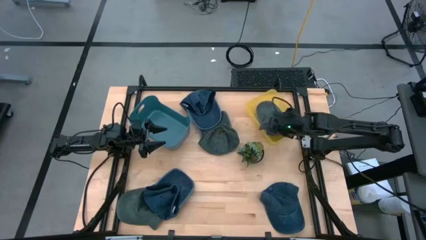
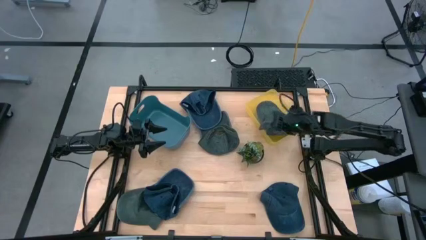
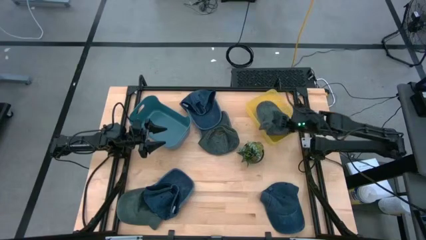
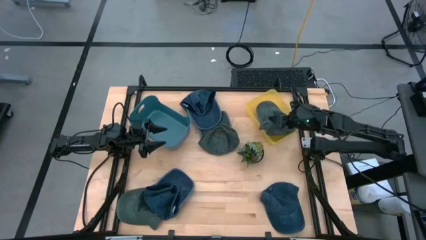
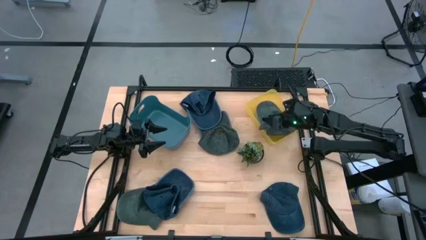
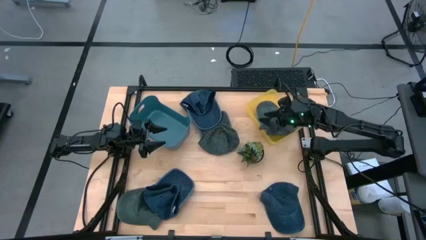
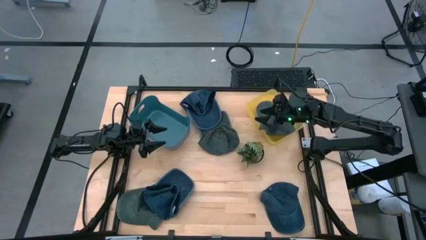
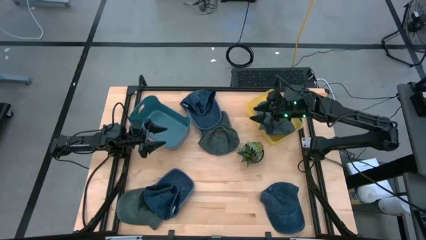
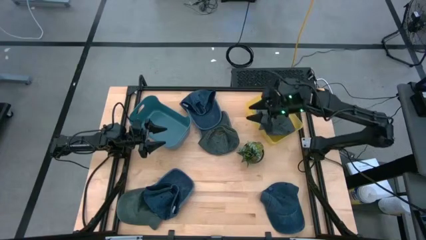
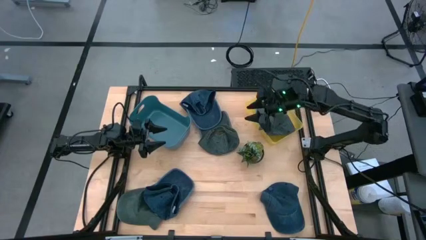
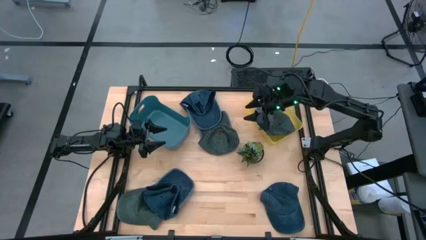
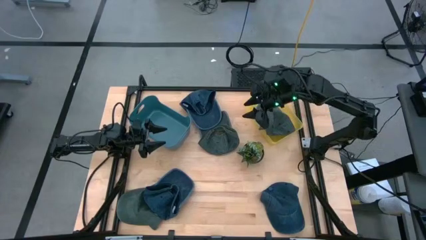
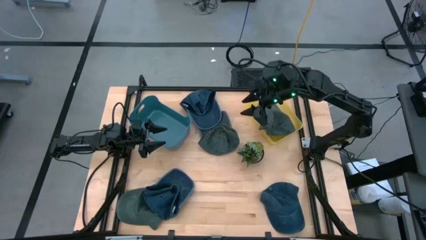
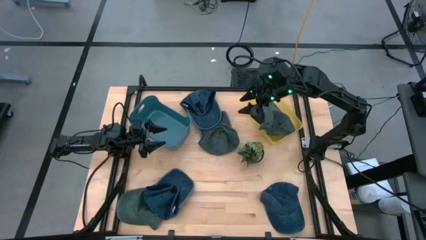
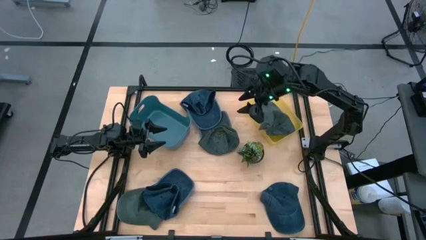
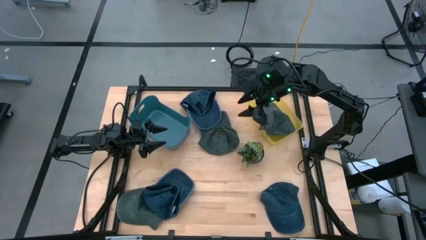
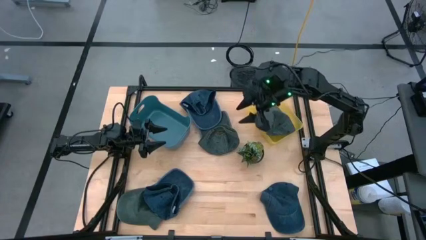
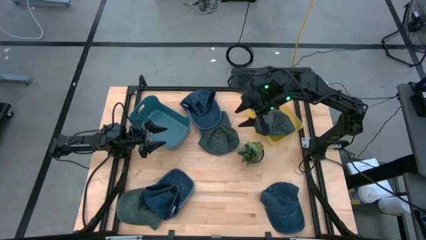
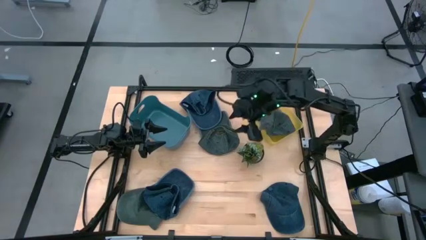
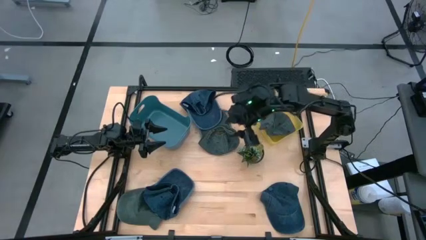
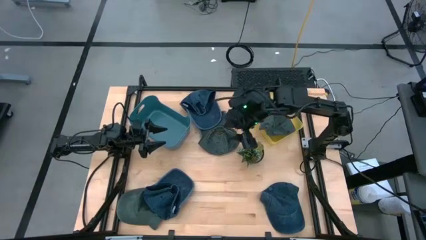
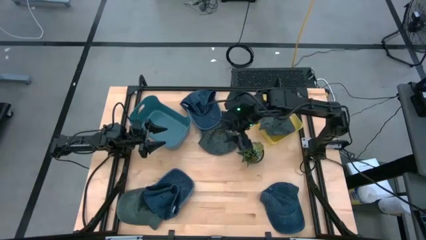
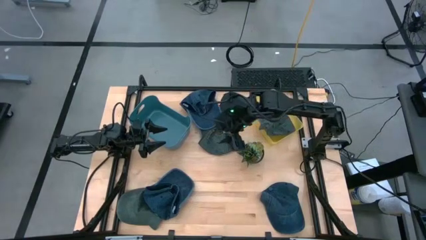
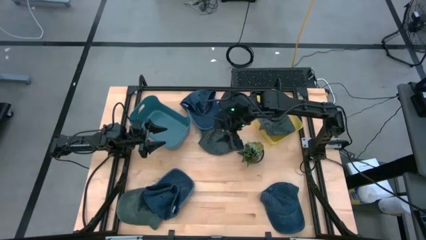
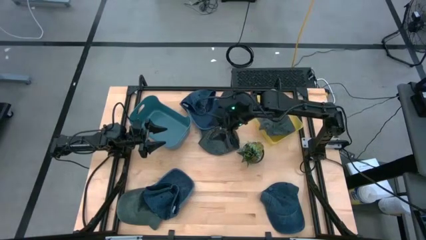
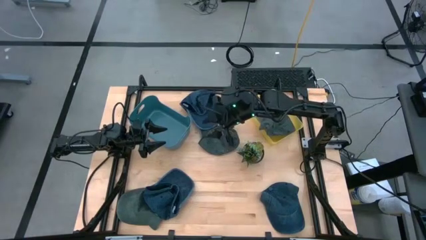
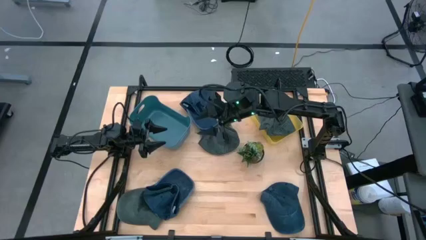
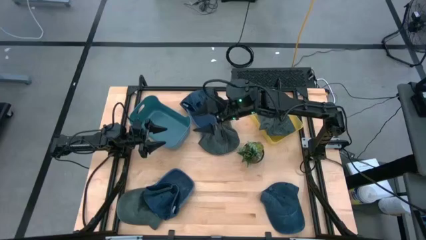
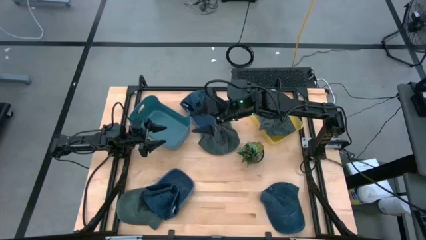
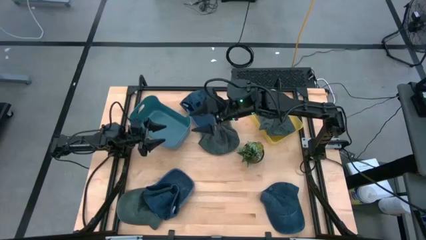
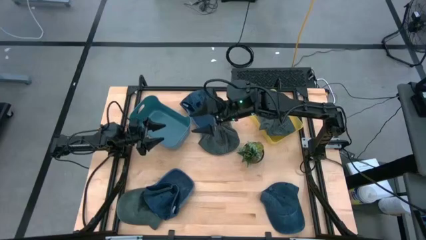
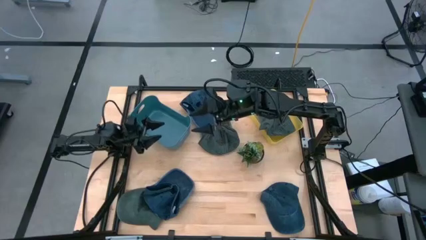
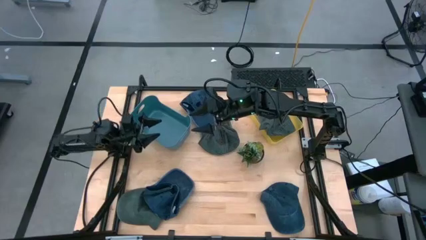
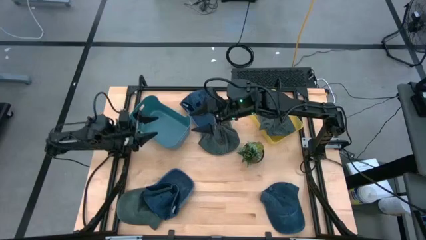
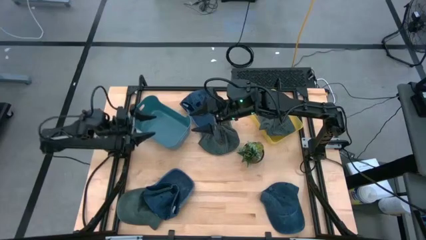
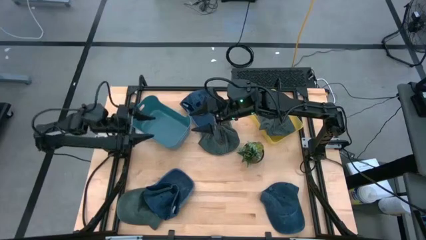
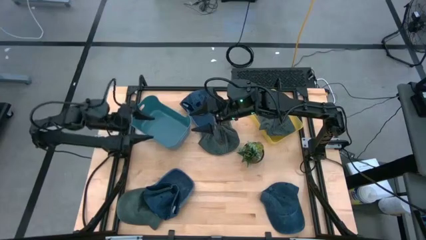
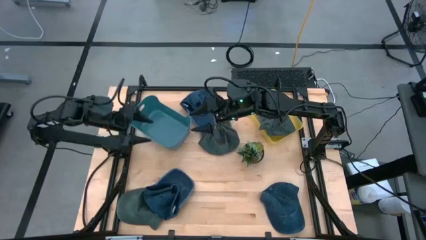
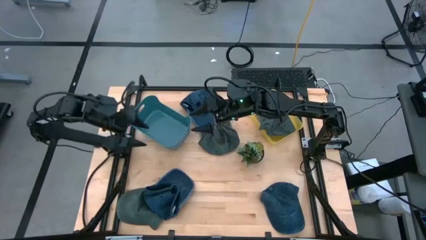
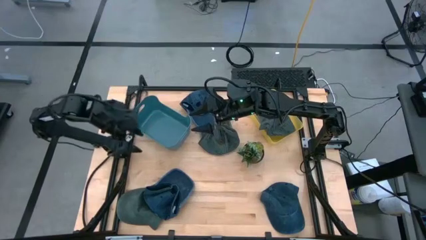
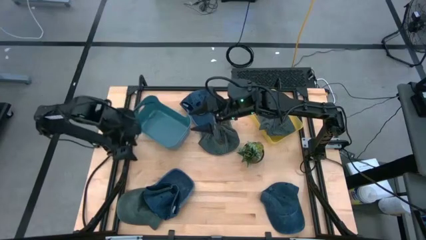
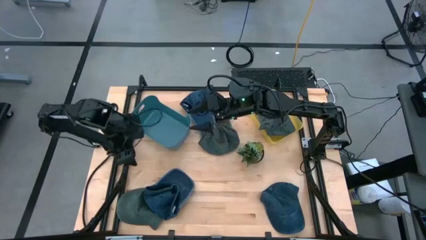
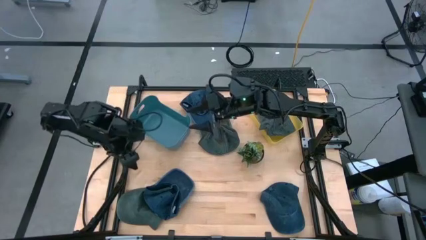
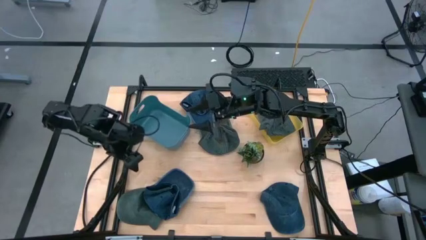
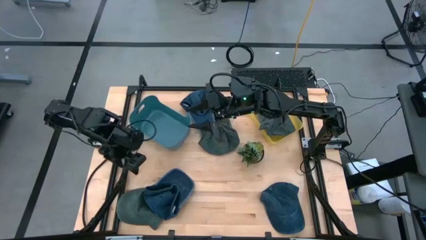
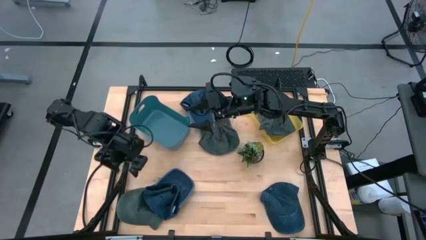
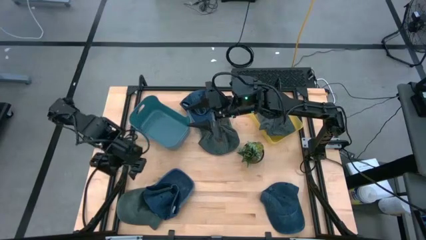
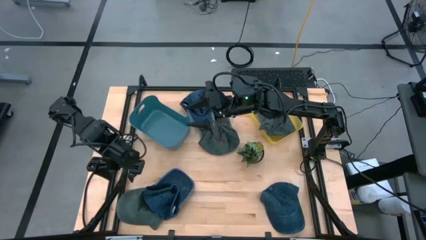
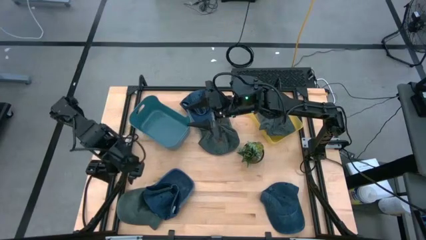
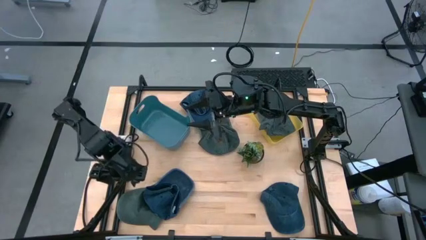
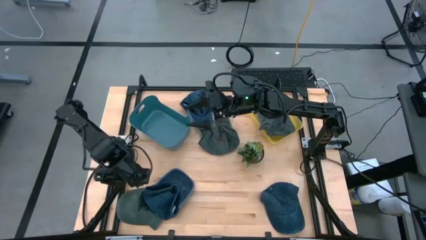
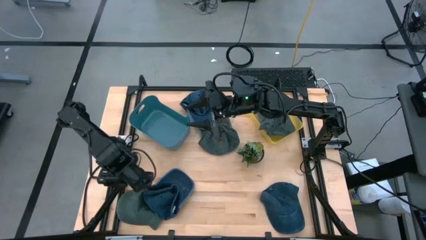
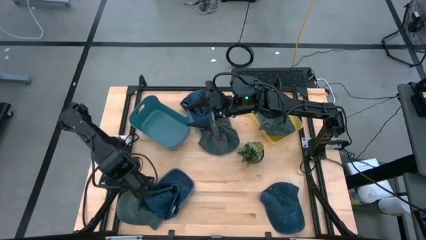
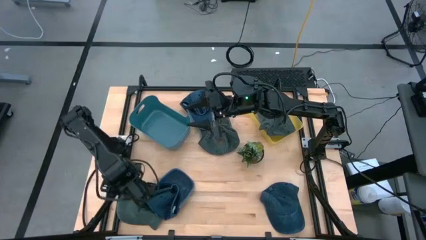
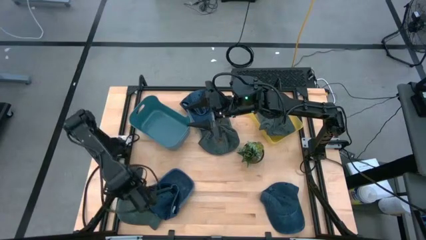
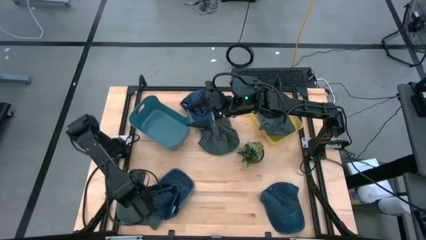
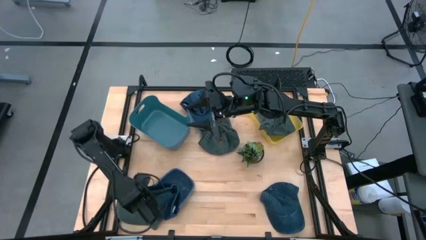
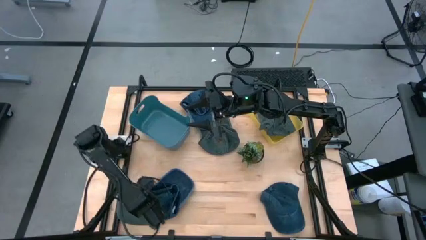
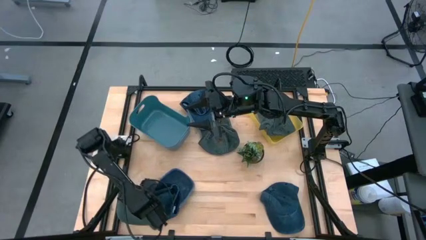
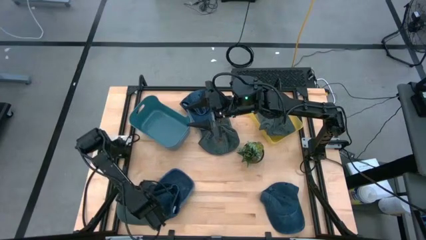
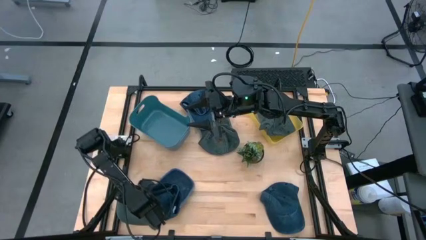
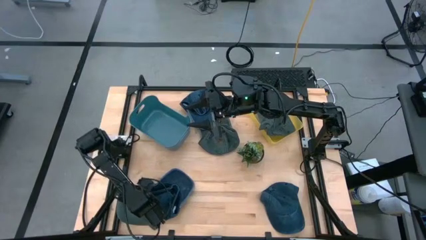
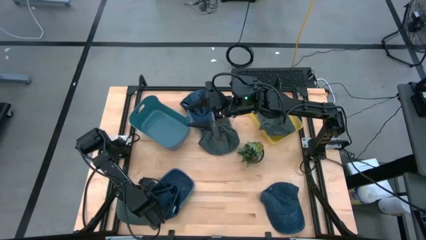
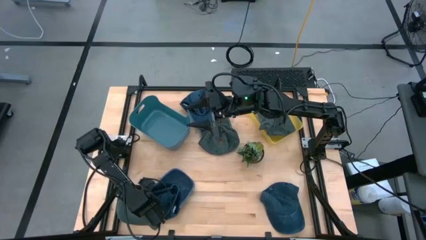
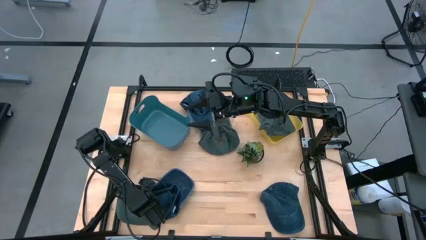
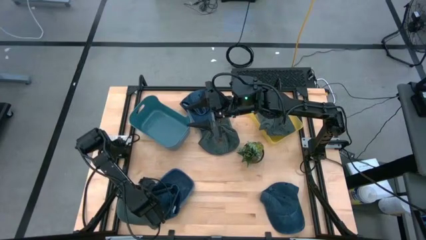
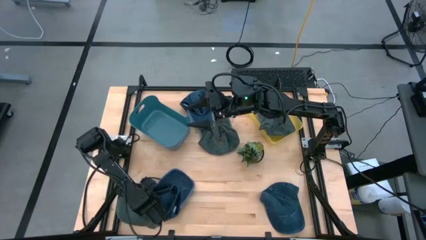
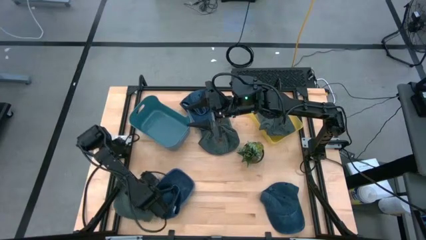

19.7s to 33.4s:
Task: Pick & Place hat
Put the bottom gray cap into the yellow bin
